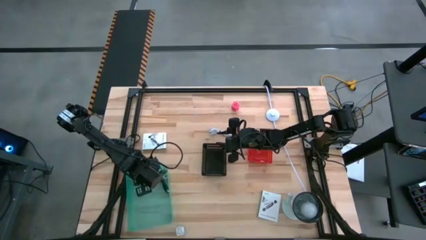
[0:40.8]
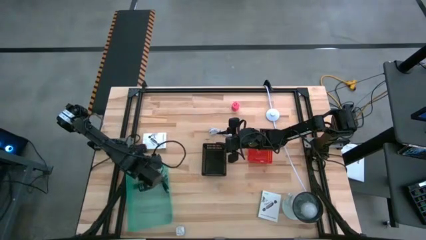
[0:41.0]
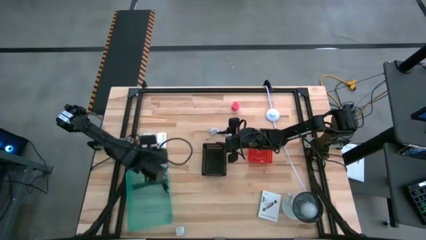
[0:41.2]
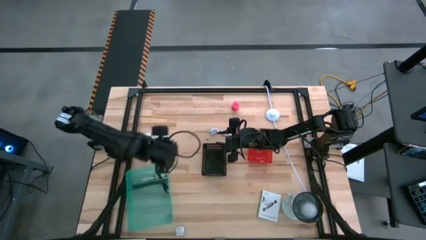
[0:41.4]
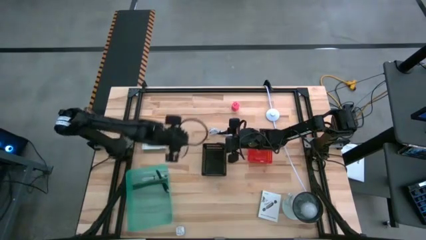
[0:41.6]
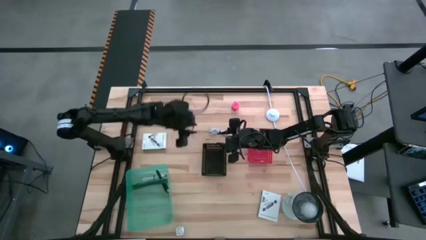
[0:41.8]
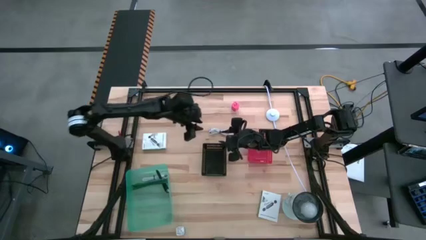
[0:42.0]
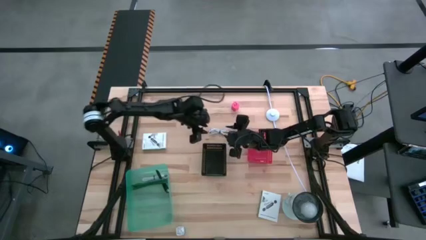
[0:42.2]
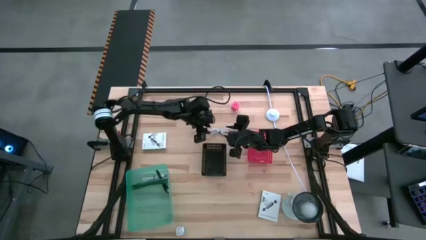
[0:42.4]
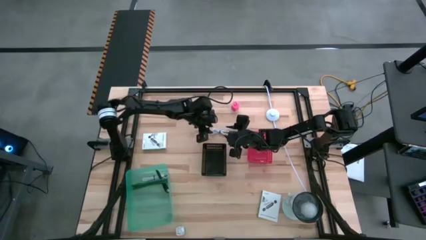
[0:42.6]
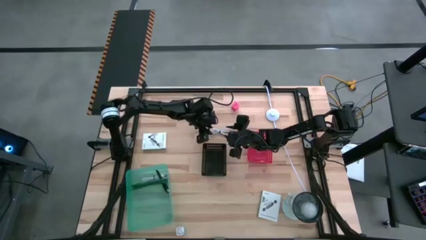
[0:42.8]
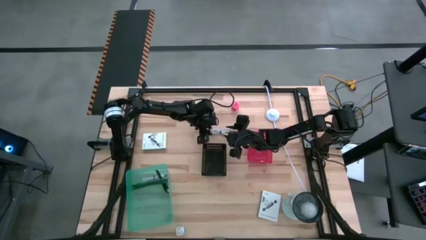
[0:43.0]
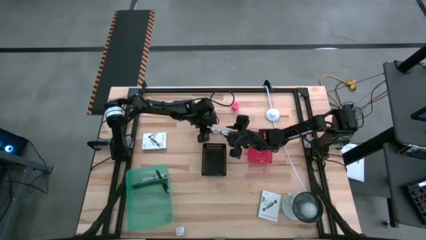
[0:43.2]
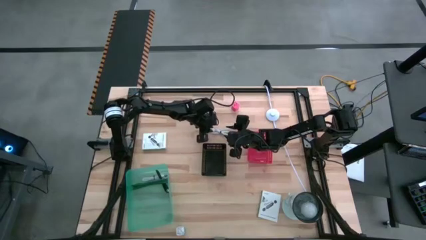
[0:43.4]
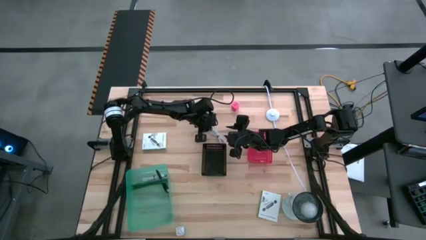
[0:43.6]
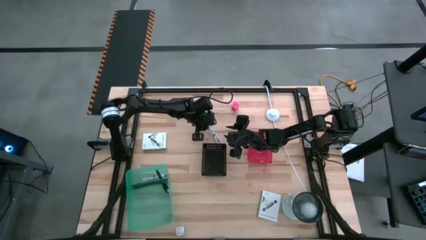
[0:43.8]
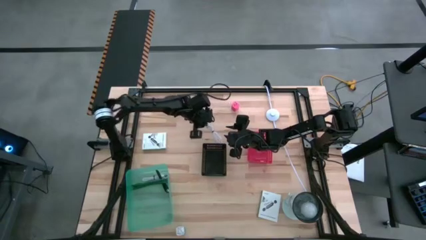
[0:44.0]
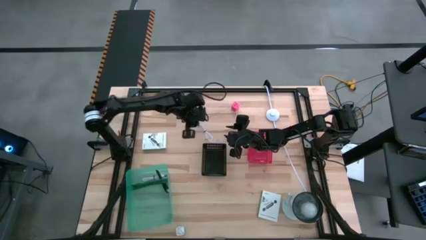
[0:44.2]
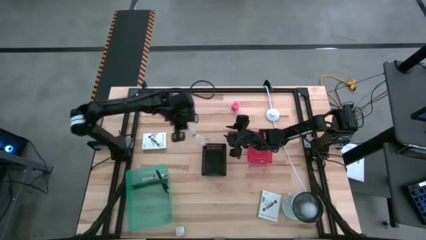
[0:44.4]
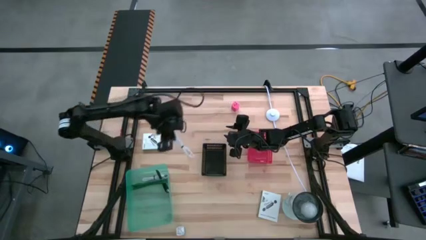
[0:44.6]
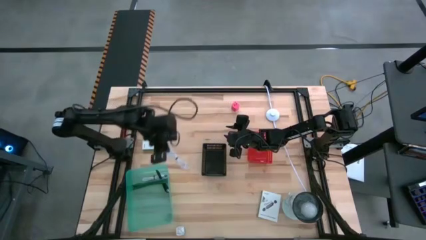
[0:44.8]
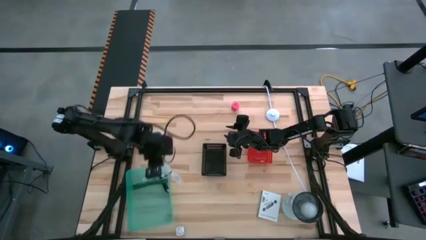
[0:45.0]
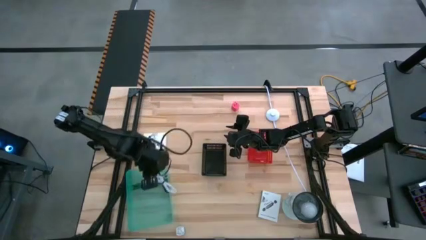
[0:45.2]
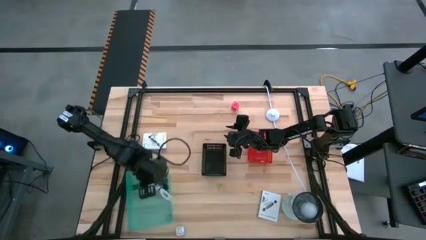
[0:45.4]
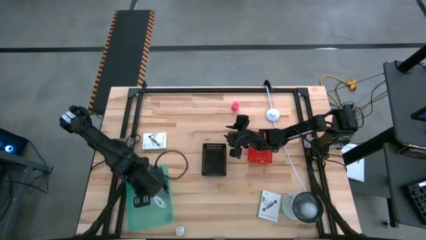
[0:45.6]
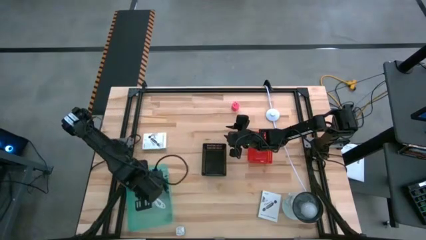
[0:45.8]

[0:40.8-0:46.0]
Task: Pick and place items into bin
Put the white charger cable into the green bin

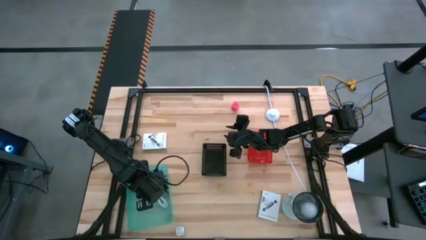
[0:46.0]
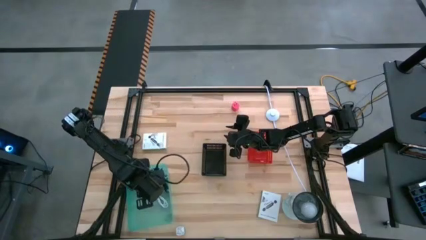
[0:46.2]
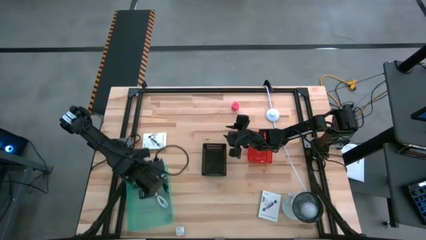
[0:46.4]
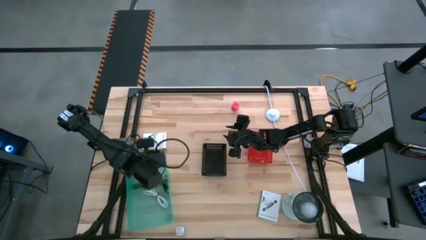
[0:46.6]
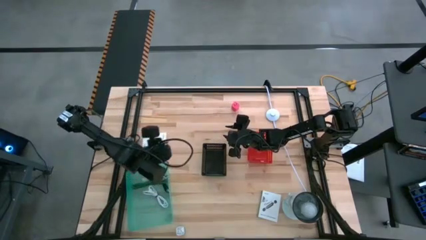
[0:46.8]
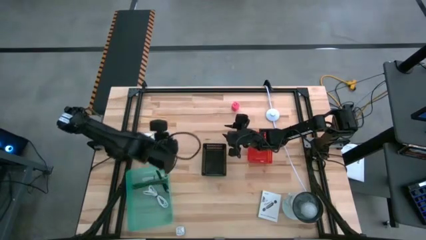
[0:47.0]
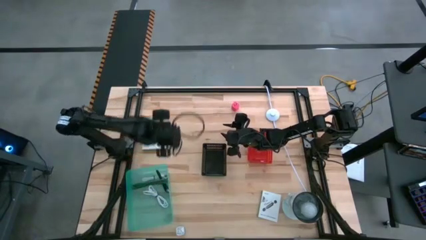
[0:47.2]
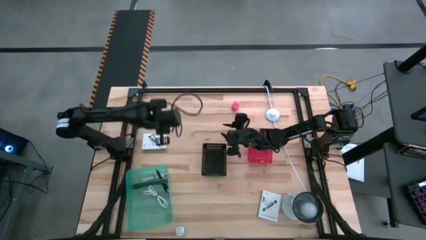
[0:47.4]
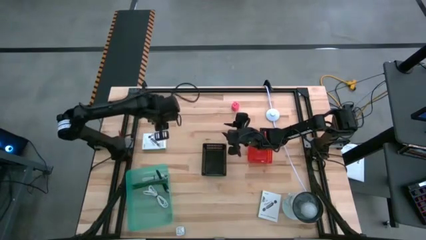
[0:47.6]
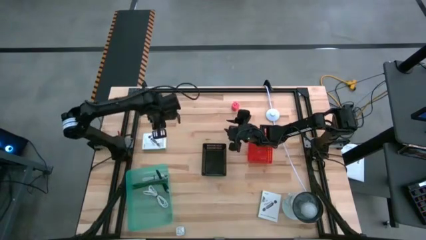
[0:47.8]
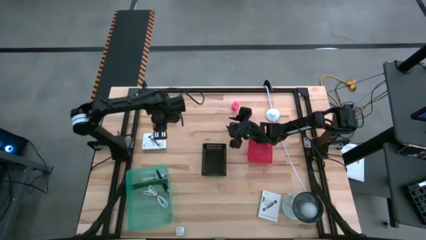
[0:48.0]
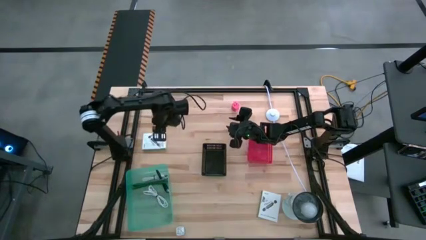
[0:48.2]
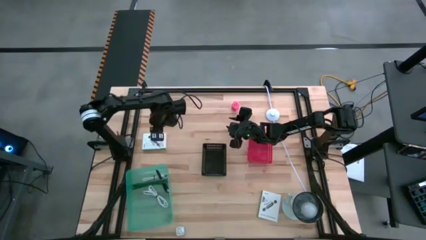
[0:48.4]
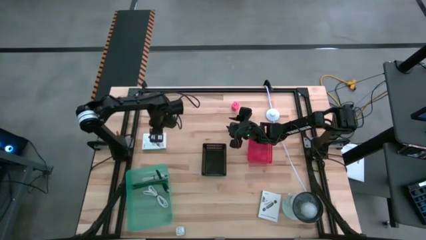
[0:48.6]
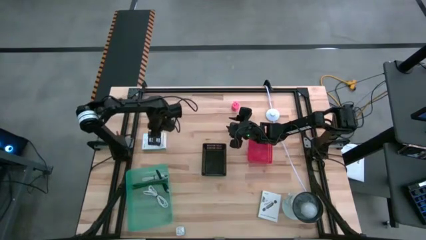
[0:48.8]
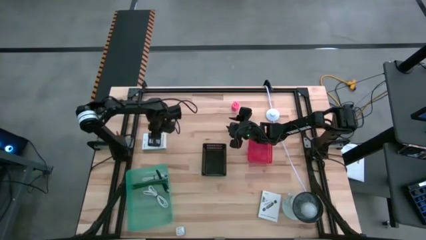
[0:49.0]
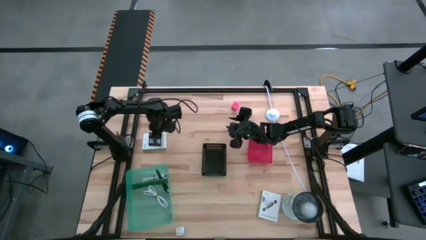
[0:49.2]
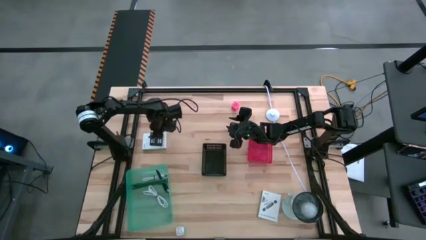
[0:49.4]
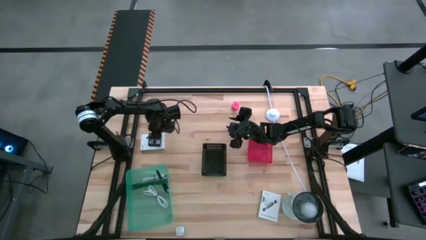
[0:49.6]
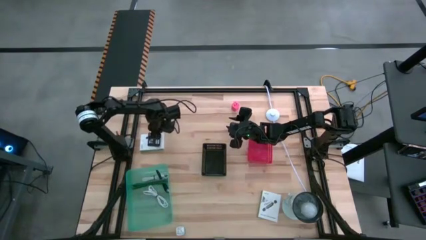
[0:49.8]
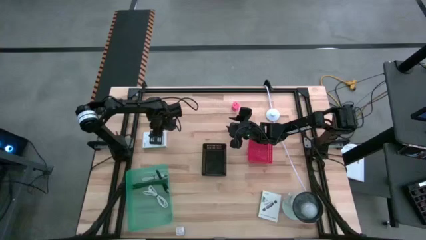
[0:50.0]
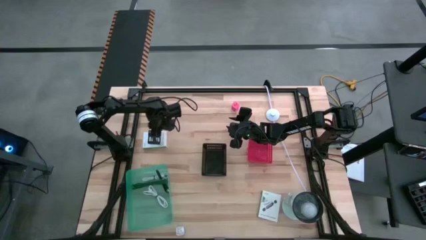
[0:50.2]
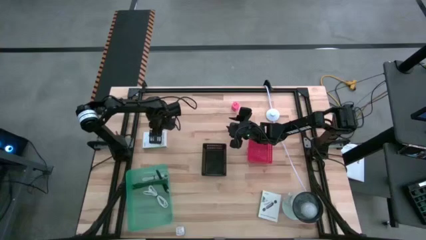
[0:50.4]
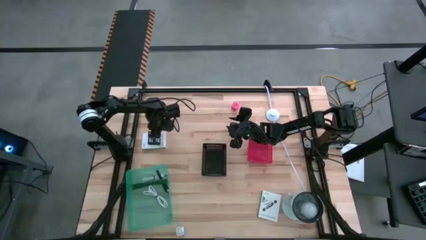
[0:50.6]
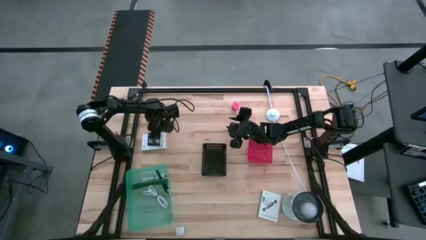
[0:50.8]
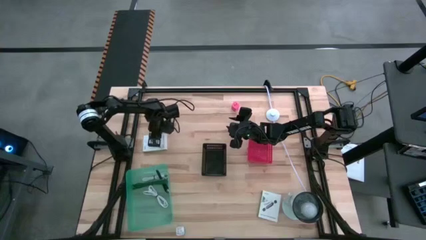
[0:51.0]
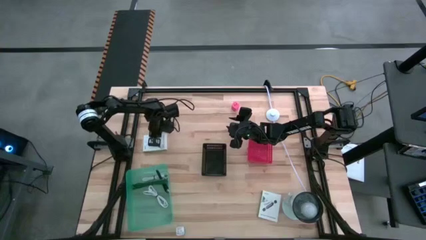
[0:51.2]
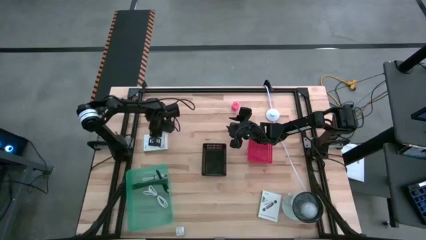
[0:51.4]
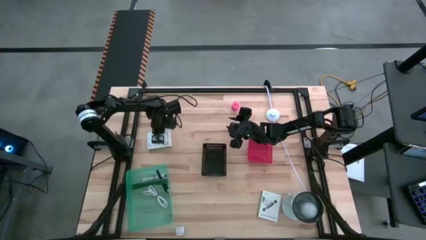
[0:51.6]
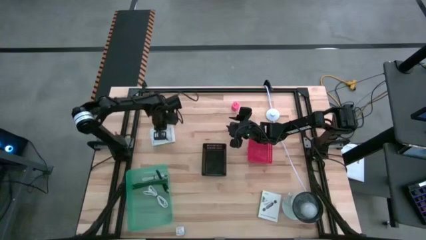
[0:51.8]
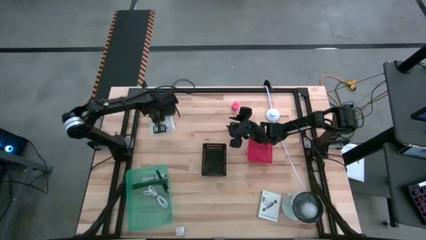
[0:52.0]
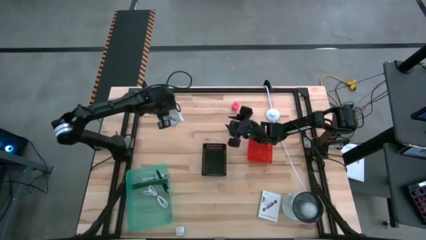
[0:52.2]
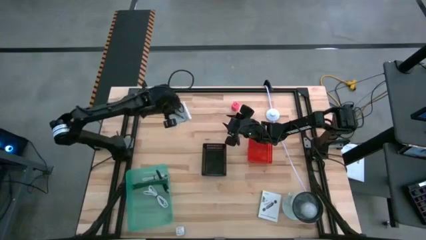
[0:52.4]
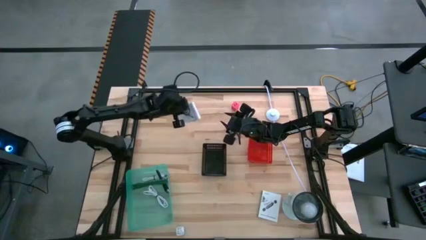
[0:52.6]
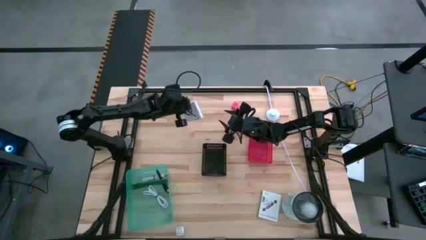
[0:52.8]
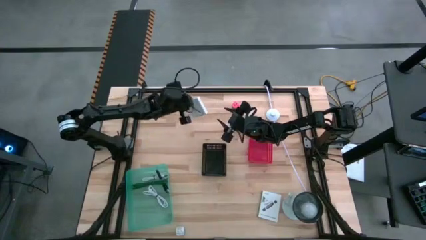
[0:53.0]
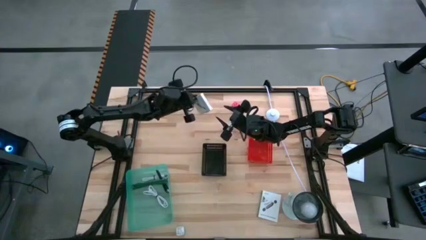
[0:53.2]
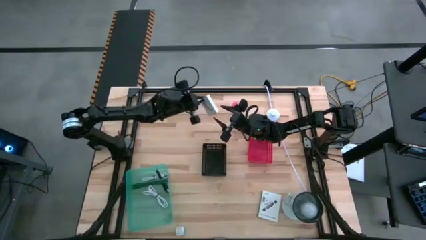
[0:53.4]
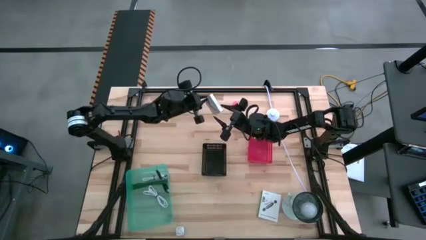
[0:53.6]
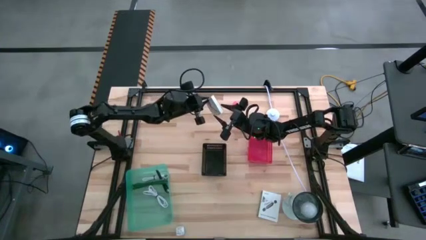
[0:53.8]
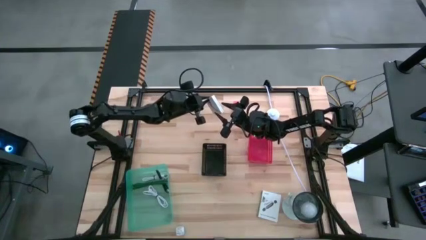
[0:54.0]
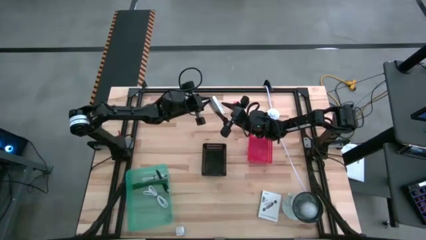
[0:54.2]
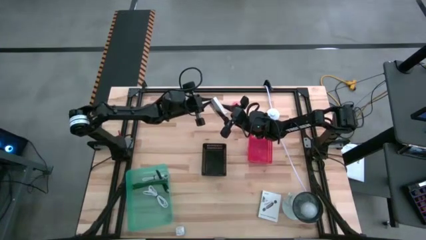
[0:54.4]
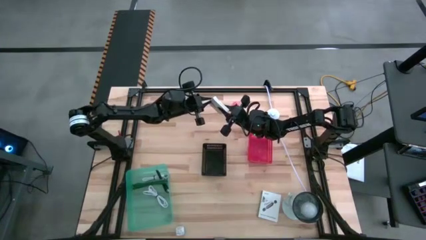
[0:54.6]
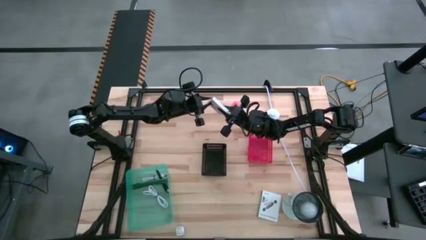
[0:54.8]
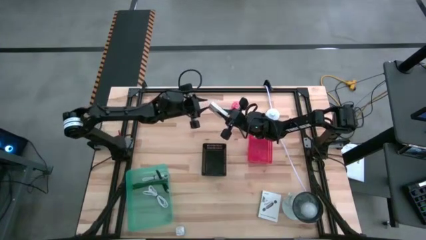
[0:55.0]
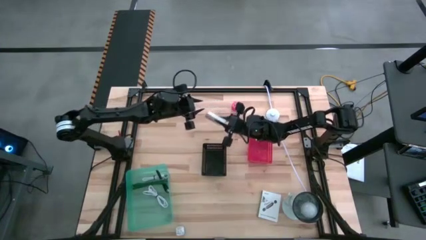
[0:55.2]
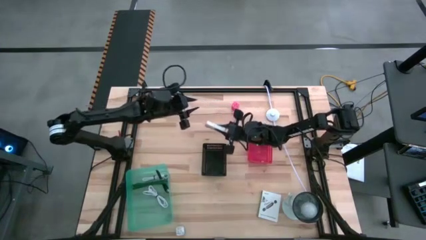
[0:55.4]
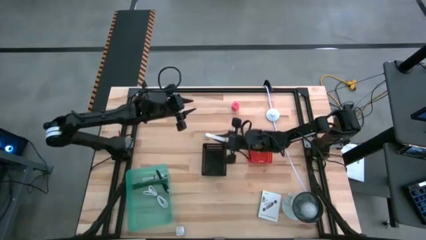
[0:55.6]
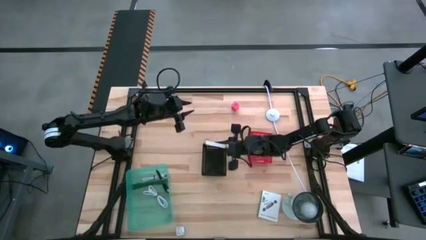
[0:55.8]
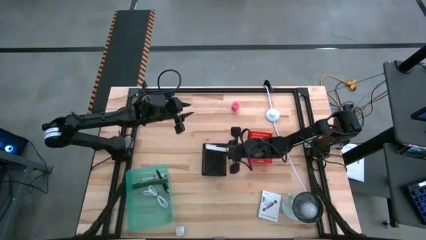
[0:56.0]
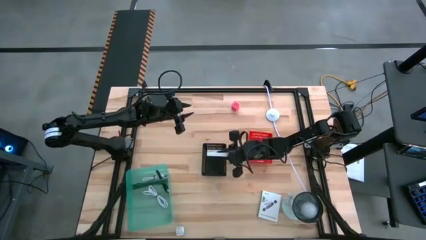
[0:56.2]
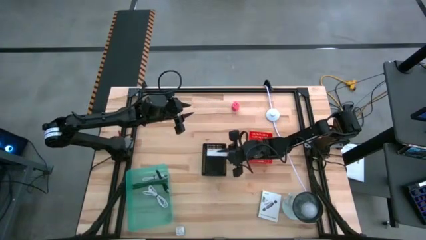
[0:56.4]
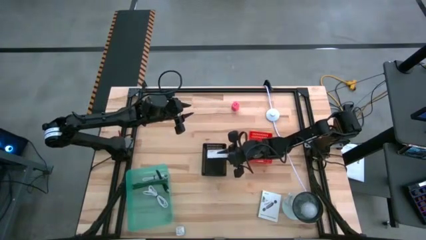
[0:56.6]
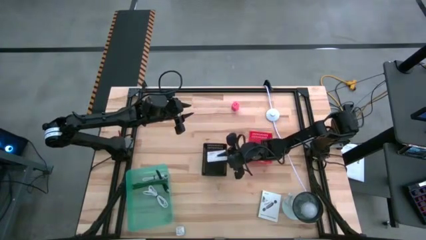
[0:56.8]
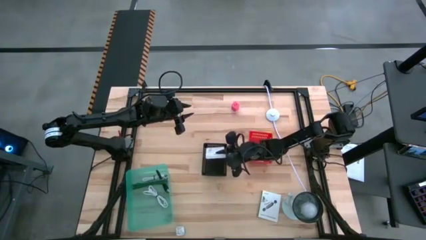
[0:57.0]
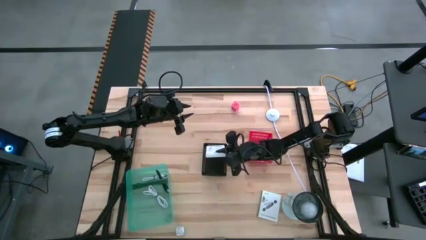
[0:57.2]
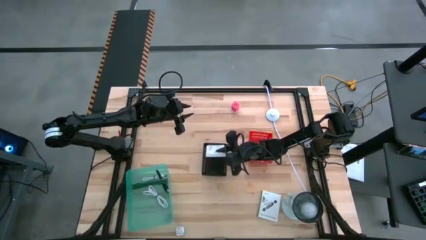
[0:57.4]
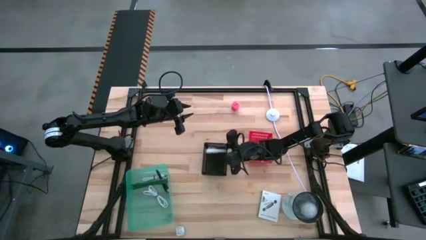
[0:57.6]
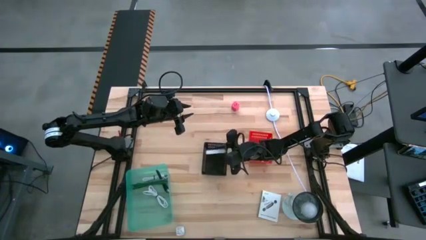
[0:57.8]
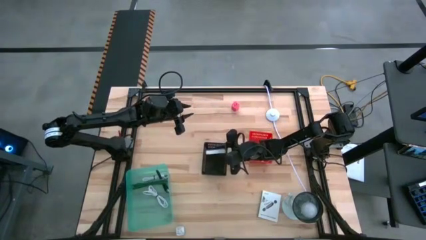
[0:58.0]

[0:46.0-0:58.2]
Put the top white card reader box into the black bin
